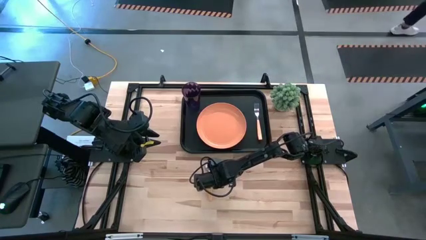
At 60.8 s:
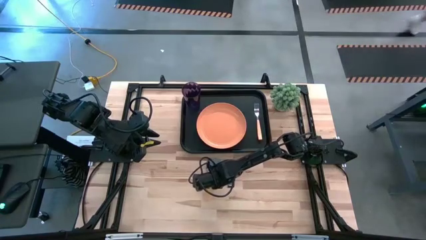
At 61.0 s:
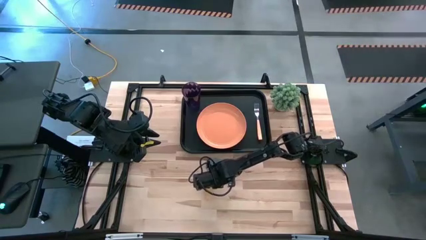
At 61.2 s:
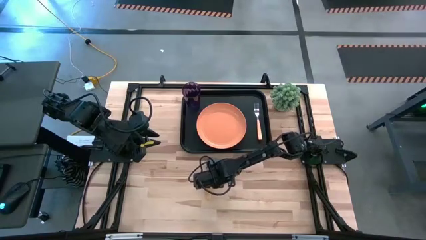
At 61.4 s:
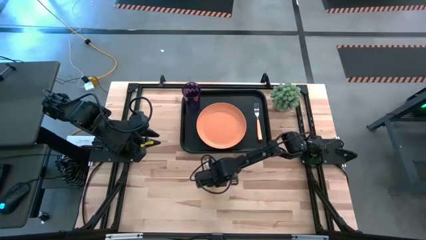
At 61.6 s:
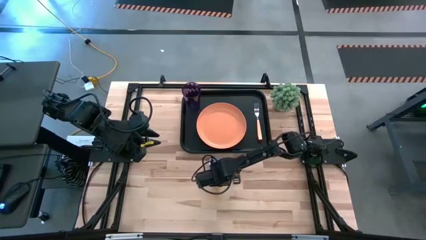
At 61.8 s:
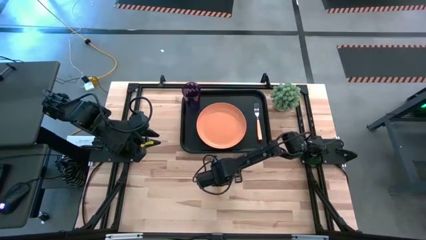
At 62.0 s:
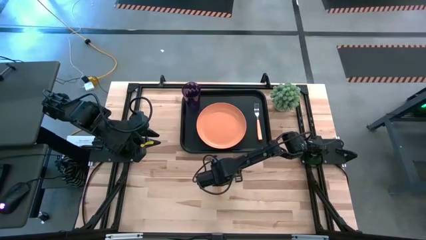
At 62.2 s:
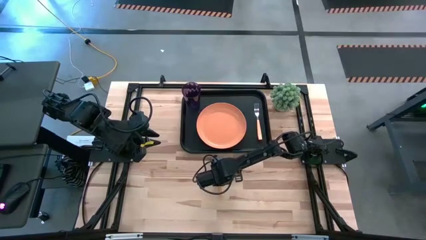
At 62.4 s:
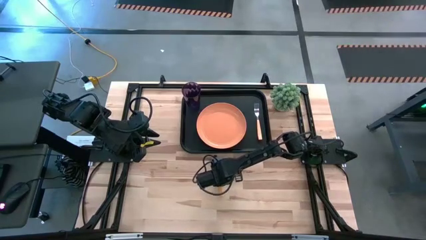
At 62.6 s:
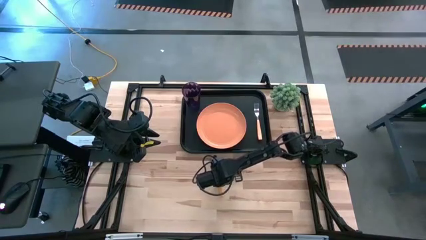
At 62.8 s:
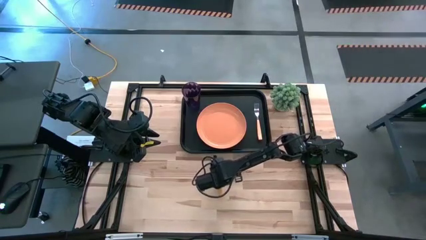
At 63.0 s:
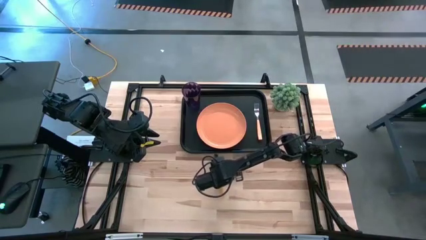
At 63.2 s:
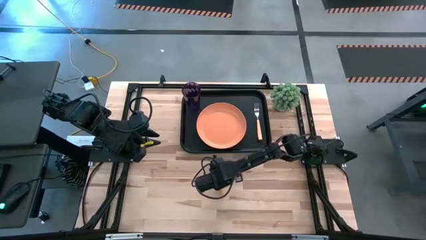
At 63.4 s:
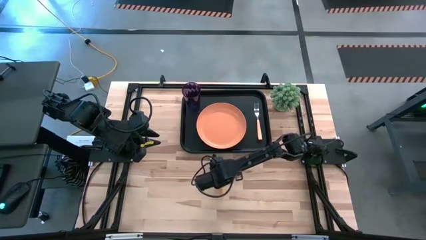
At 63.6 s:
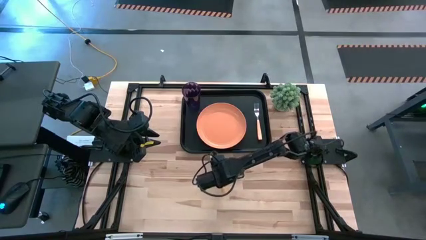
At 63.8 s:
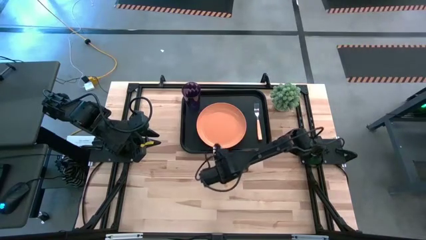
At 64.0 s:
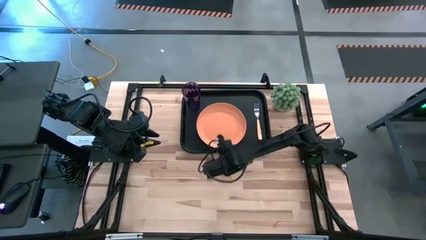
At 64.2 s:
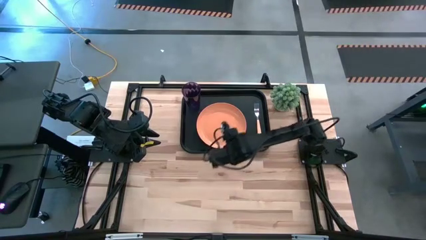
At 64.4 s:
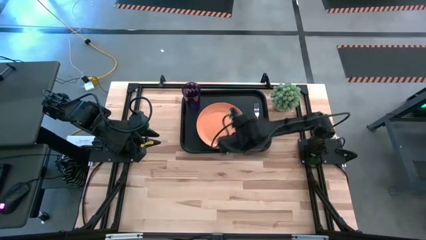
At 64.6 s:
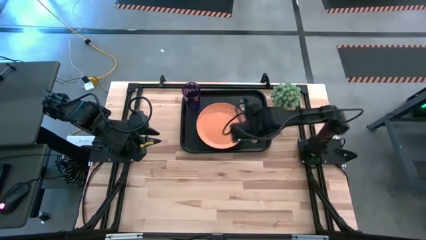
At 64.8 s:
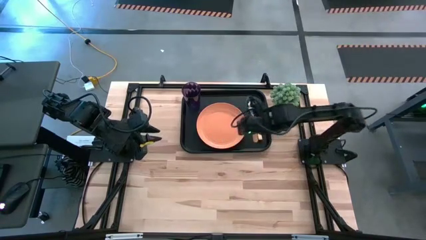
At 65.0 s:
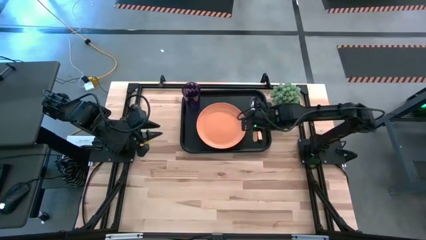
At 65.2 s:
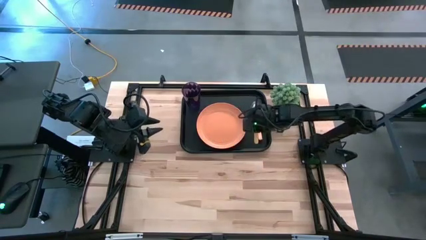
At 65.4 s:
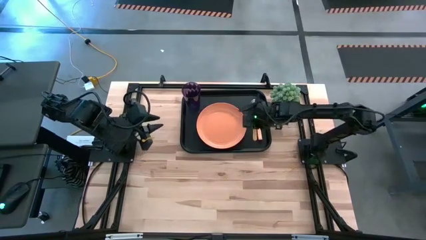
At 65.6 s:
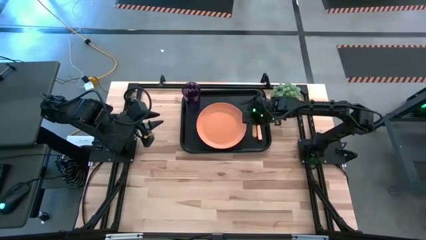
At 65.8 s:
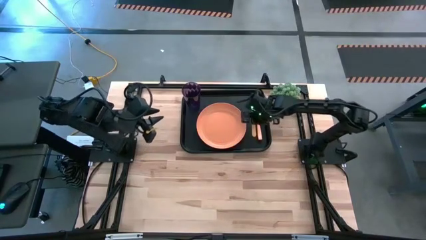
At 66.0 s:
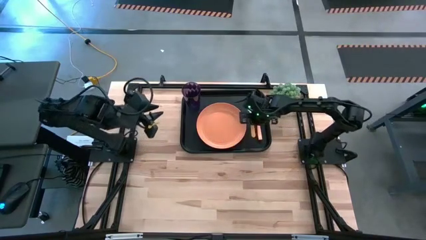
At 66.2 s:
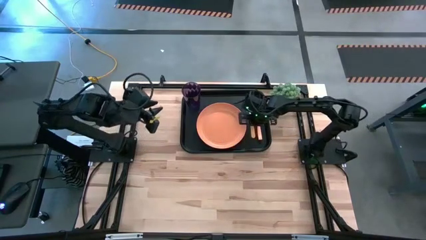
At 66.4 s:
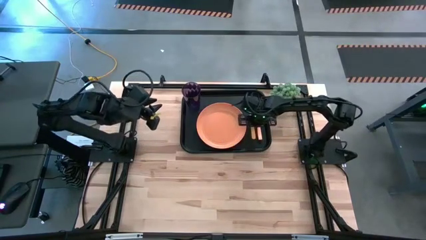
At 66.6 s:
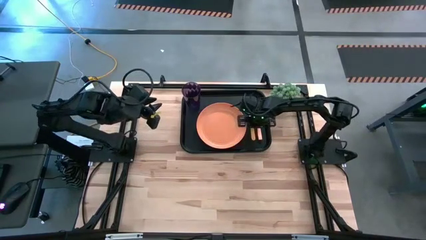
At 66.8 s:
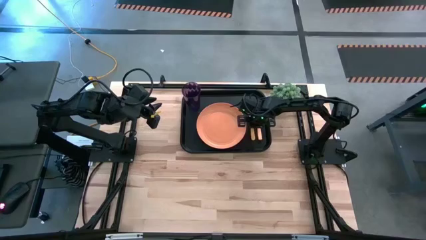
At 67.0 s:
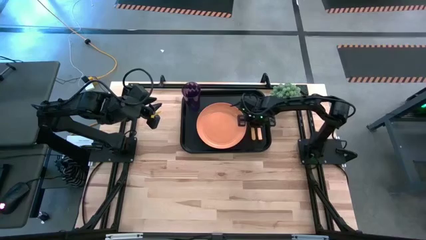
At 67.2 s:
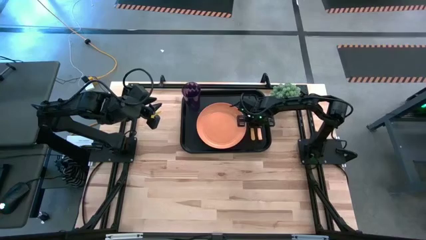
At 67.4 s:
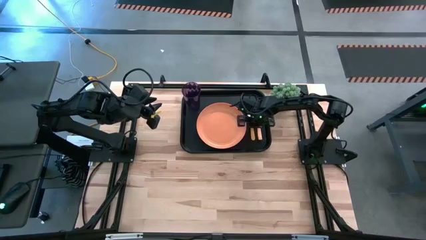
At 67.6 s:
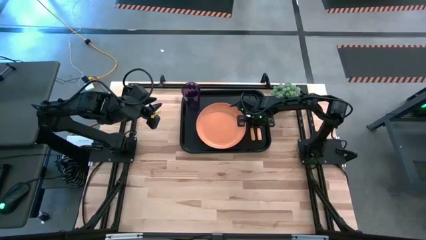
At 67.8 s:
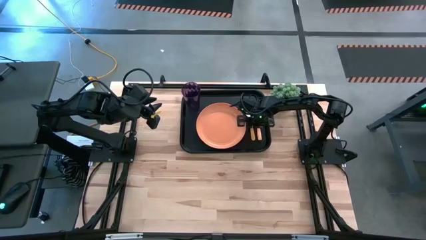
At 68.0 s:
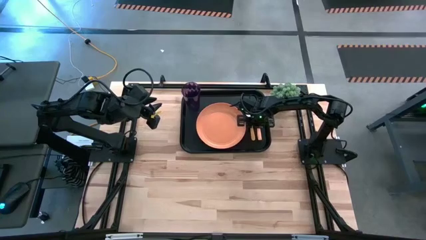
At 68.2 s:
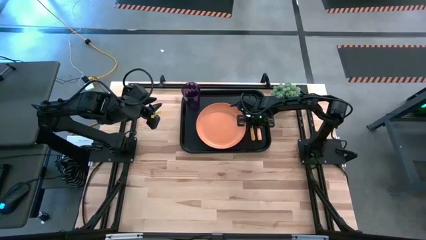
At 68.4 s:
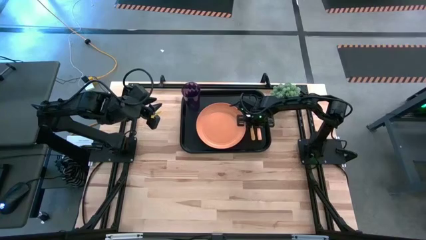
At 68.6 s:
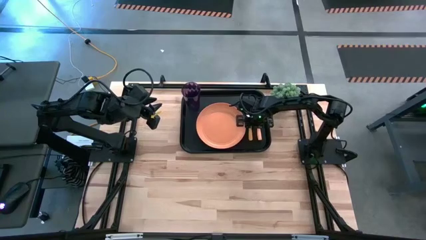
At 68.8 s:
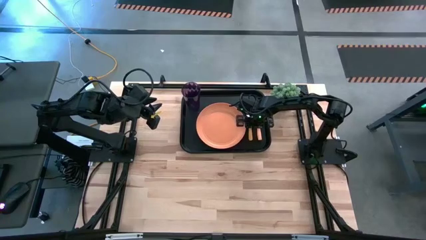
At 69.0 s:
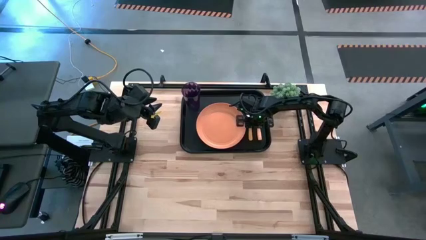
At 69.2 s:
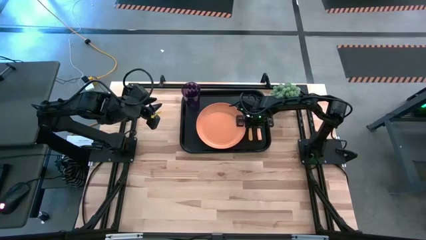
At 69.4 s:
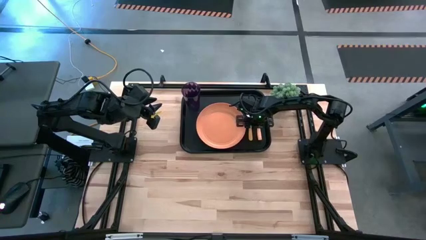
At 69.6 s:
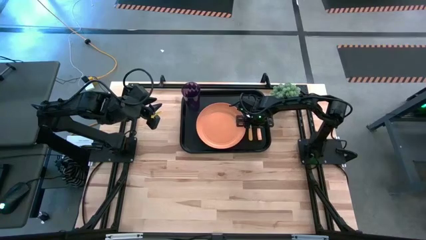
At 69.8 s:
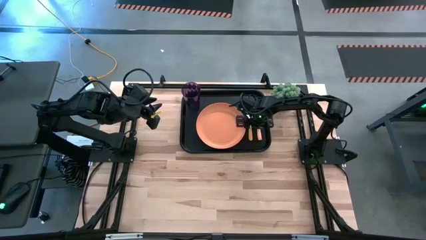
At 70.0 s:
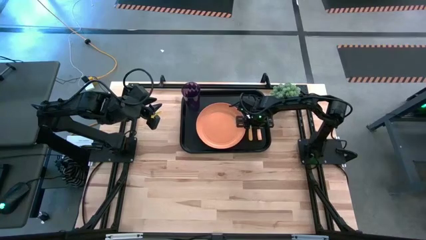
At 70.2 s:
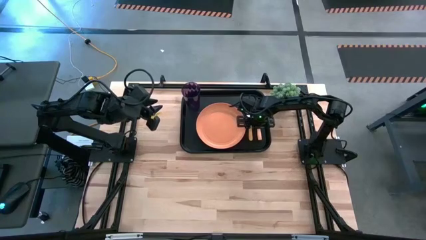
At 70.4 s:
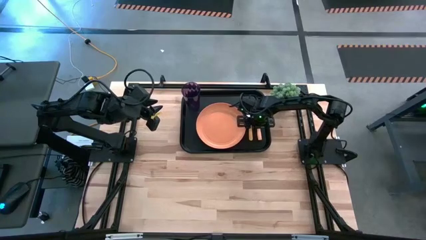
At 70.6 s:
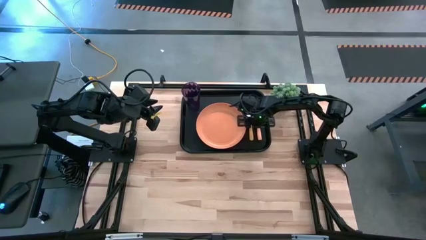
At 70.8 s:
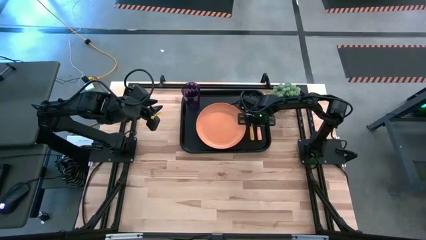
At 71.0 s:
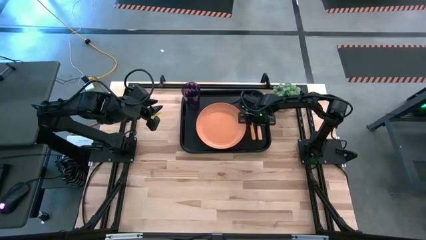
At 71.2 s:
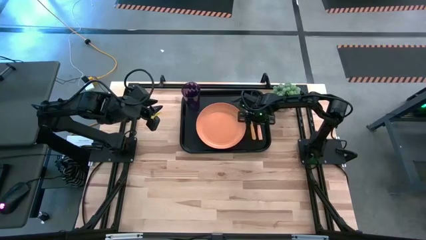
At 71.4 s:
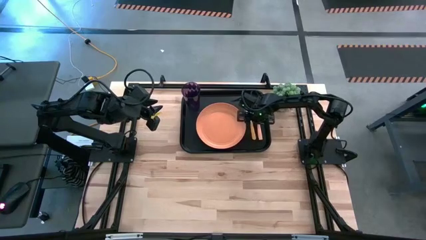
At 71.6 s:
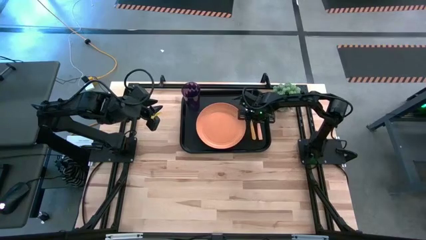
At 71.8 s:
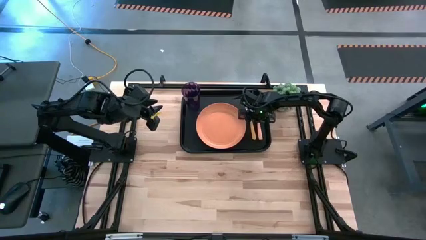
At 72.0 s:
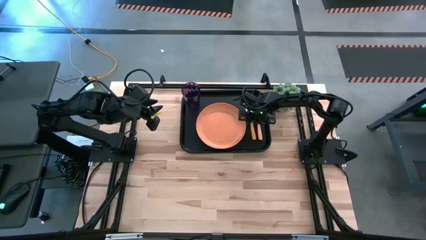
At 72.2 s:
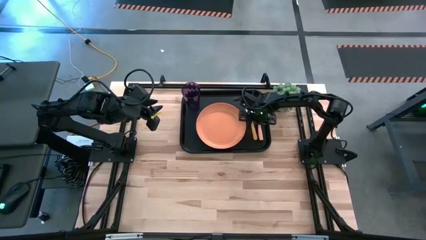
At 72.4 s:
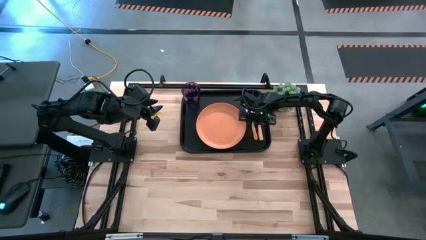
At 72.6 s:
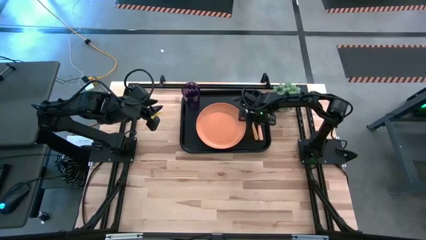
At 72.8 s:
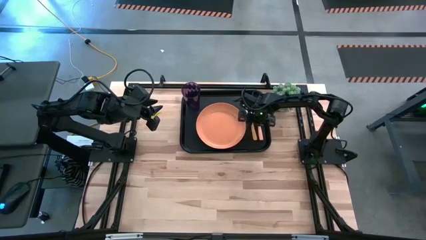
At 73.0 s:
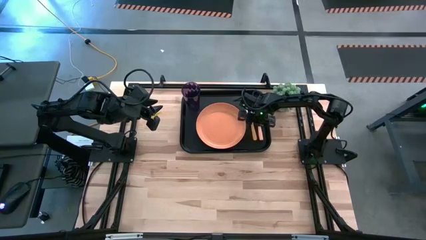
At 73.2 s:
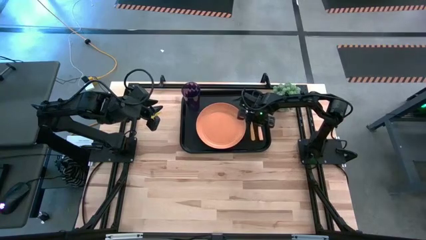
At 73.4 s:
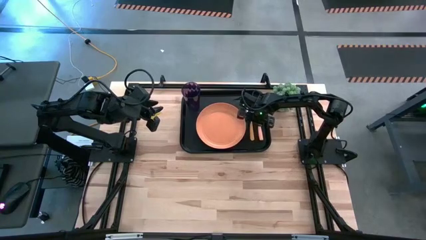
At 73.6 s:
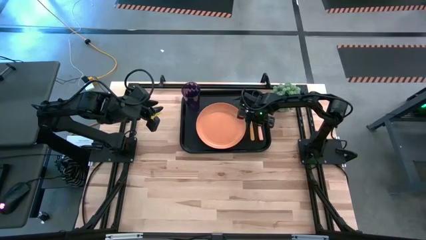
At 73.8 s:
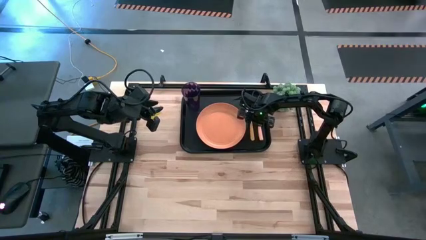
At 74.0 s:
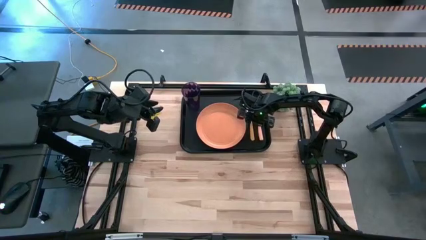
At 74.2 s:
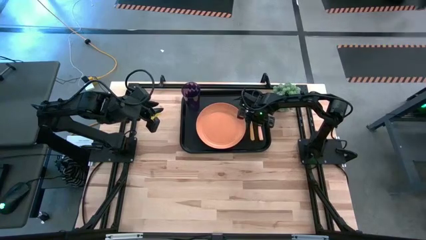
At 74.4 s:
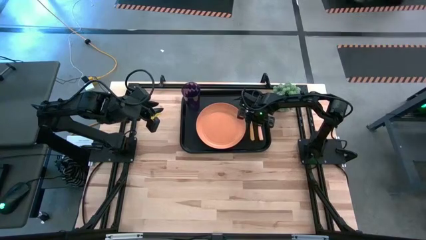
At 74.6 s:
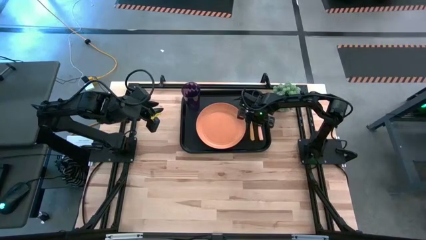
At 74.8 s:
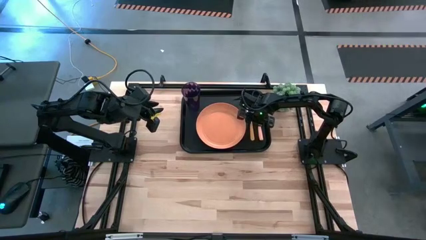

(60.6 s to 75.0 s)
Task: Pick and place plate/cup/fork/spoon on tray
Put the yellow spoon to the right of the orange plate on the black serving tray
